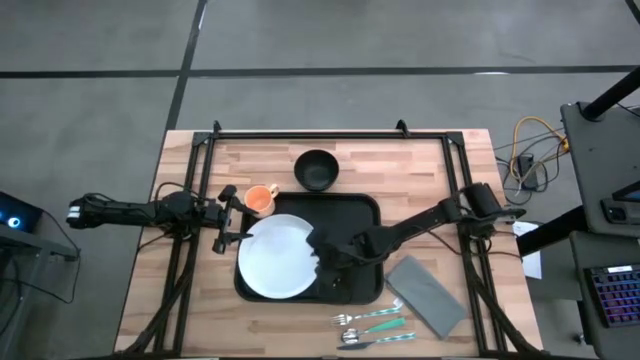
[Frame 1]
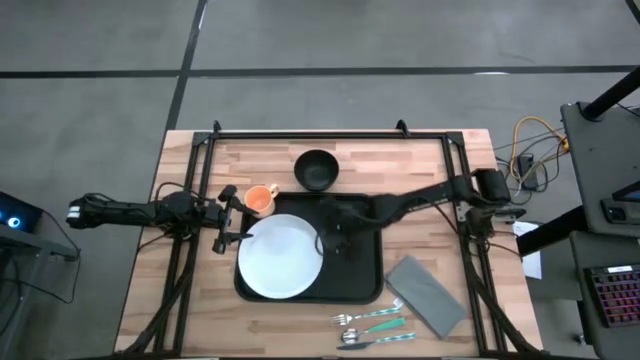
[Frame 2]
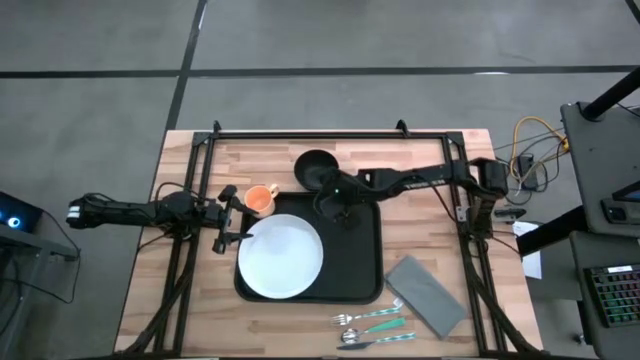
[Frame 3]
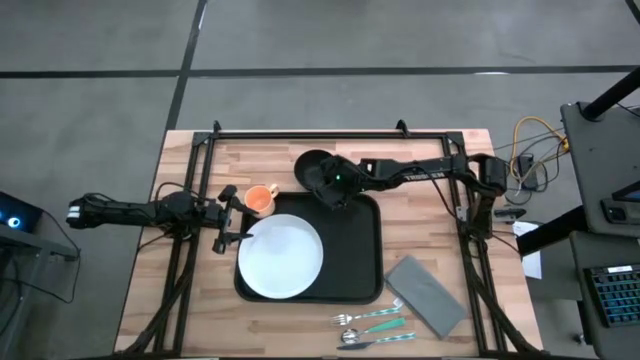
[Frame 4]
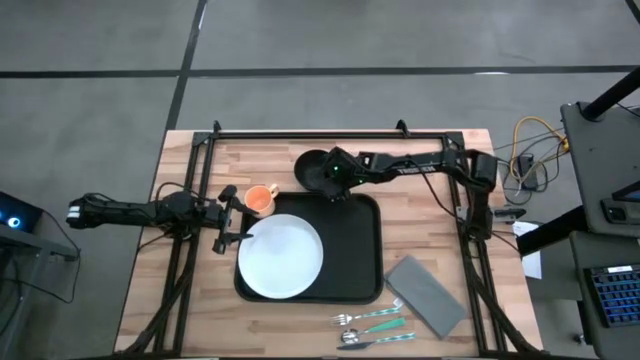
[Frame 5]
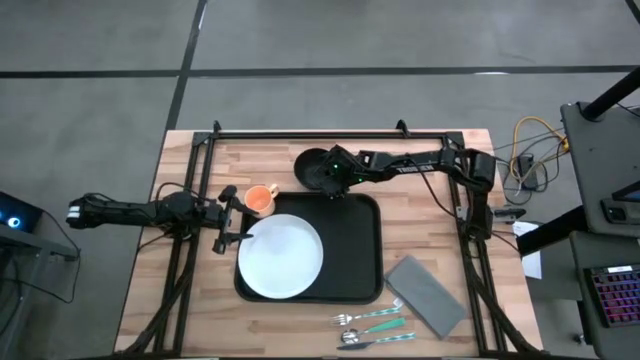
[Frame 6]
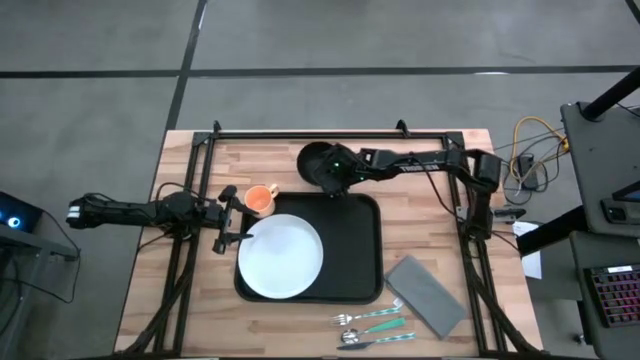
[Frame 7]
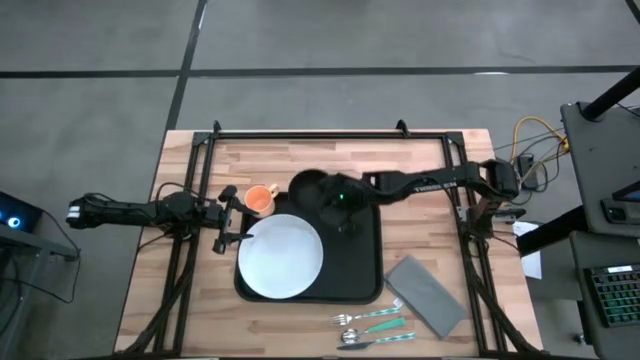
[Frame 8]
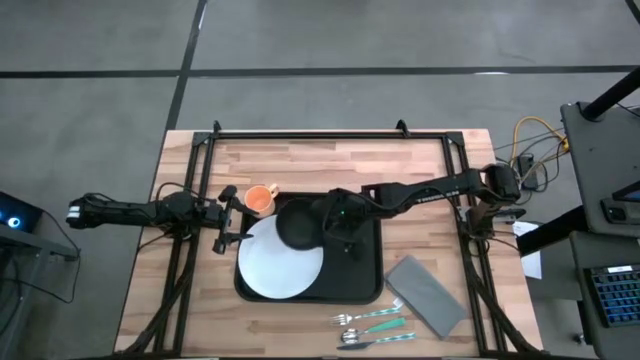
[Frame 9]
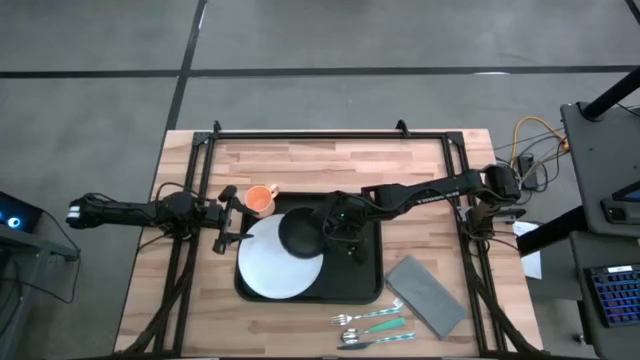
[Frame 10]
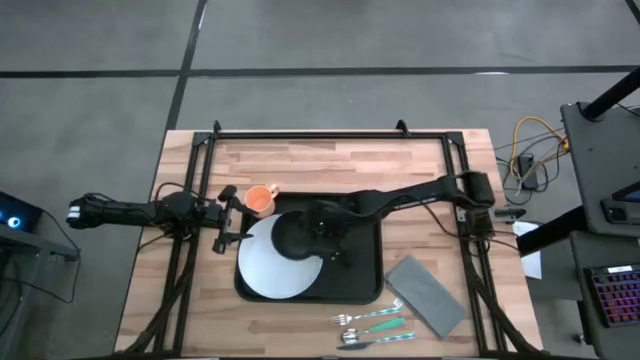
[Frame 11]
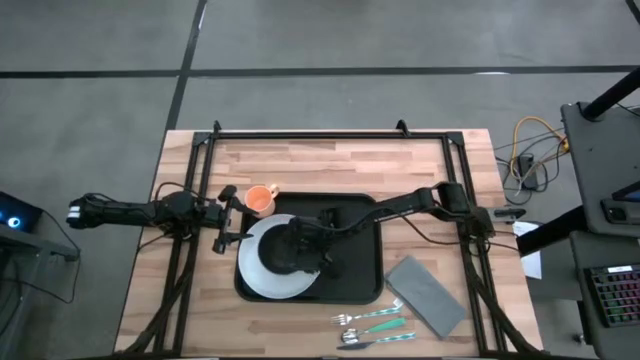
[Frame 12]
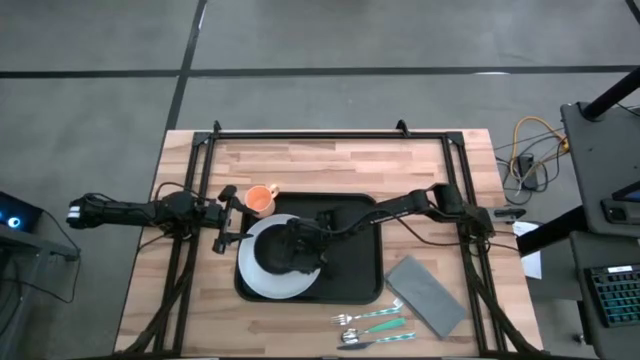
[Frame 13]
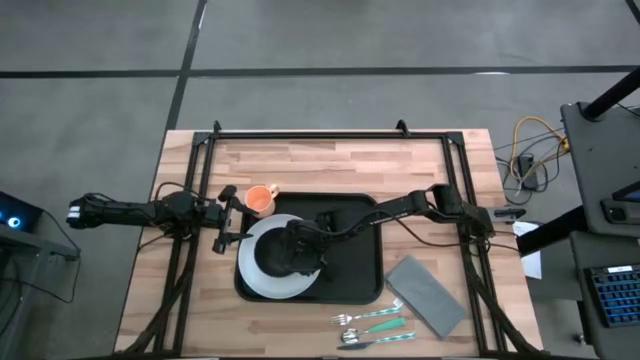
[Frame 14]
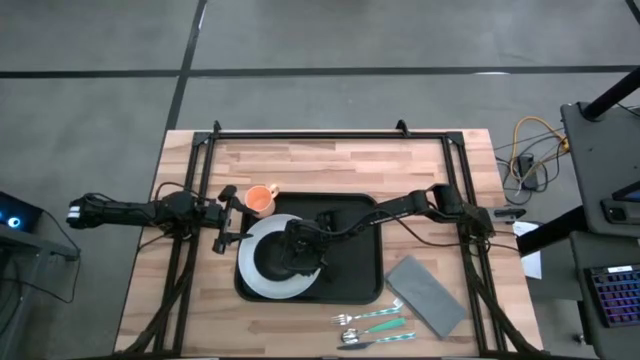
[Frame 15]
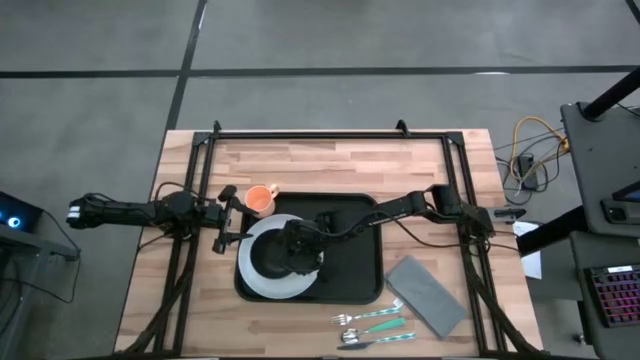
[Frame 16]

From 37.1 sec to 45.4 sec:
Task: Set up tray
Put the black bowl on top of the white plate on the black tray

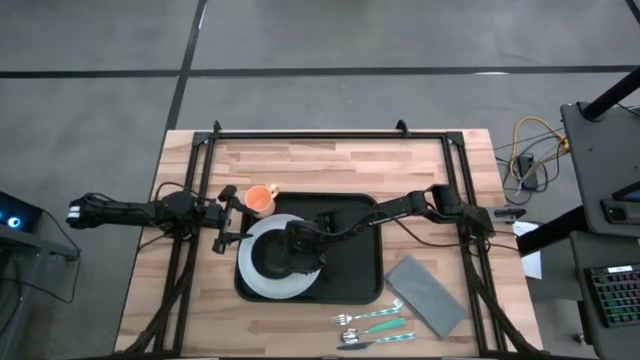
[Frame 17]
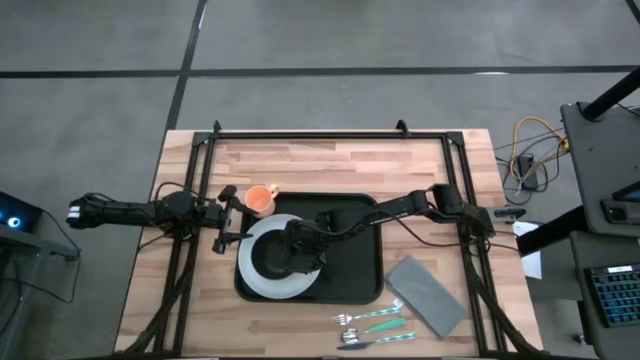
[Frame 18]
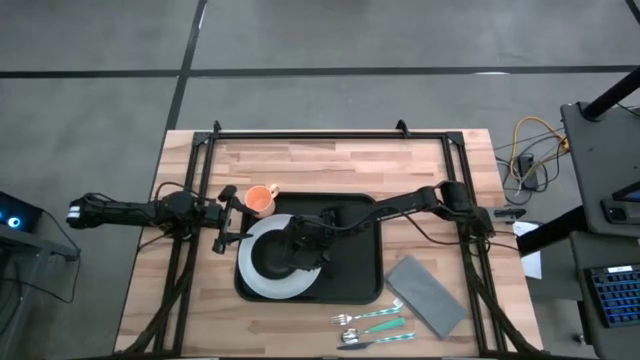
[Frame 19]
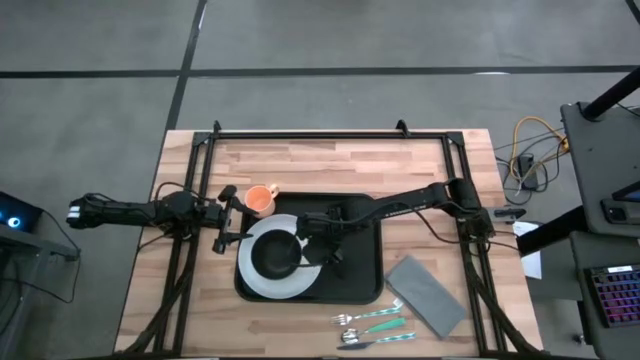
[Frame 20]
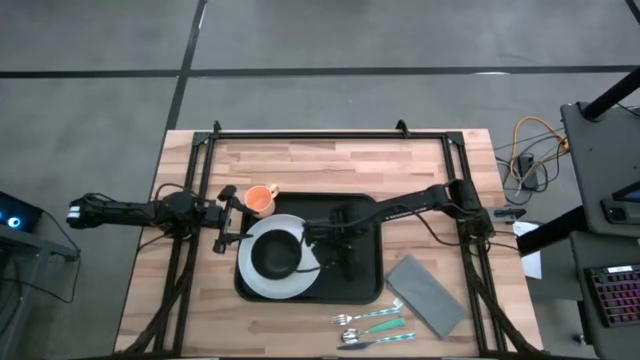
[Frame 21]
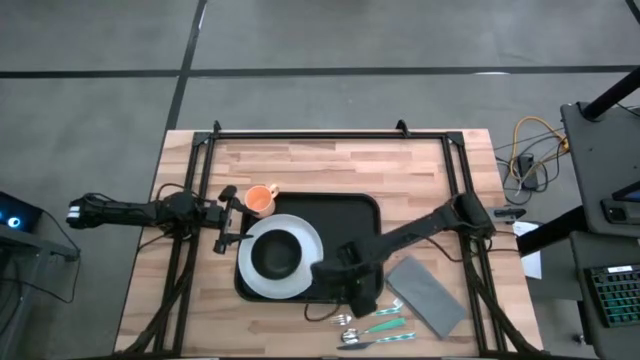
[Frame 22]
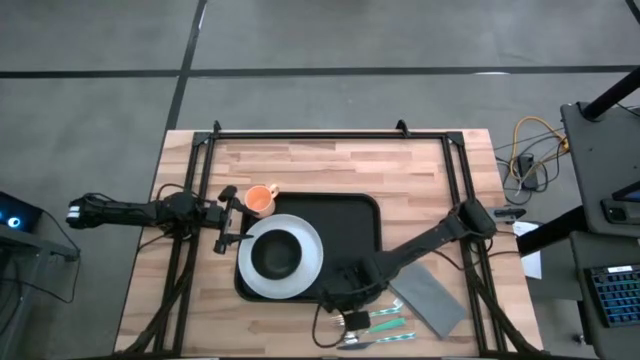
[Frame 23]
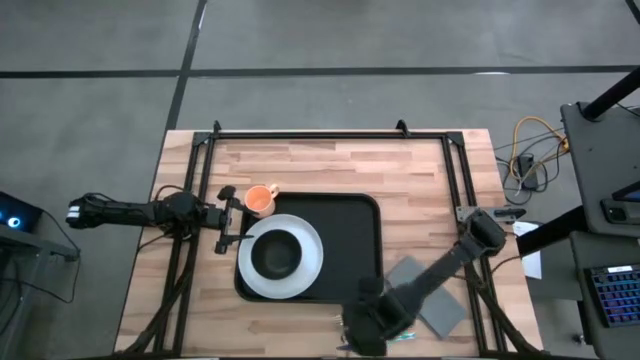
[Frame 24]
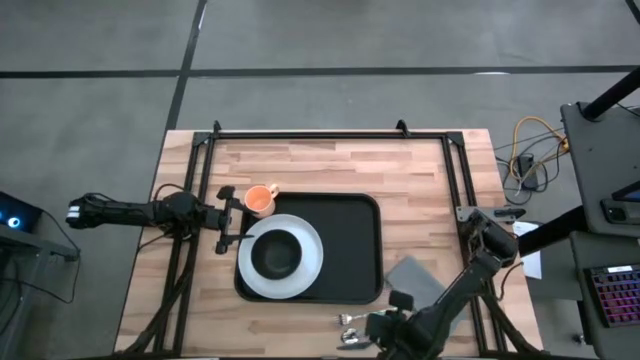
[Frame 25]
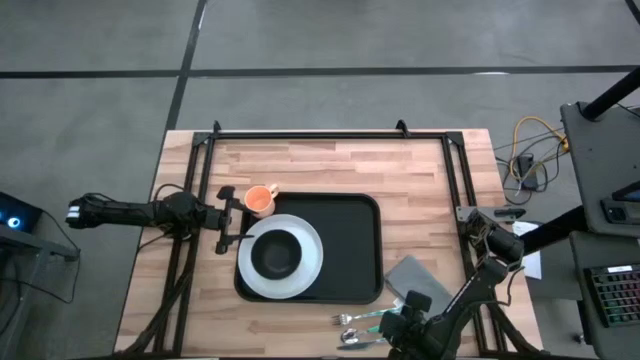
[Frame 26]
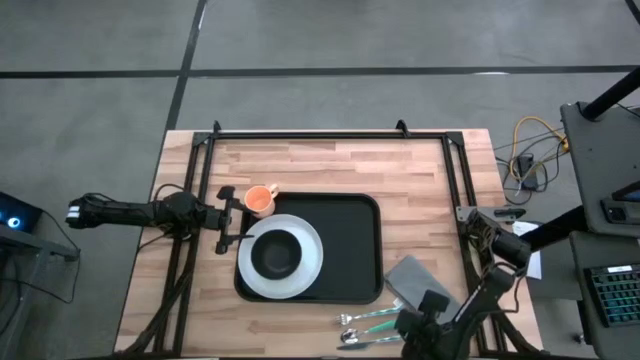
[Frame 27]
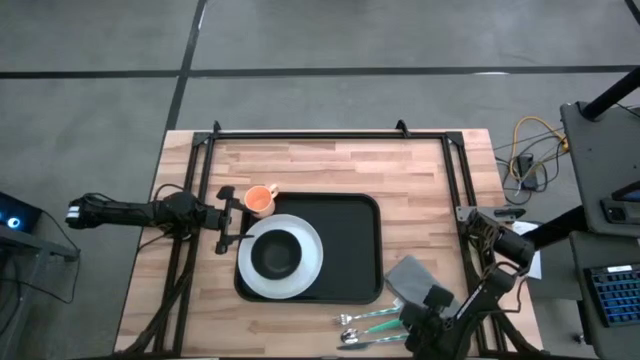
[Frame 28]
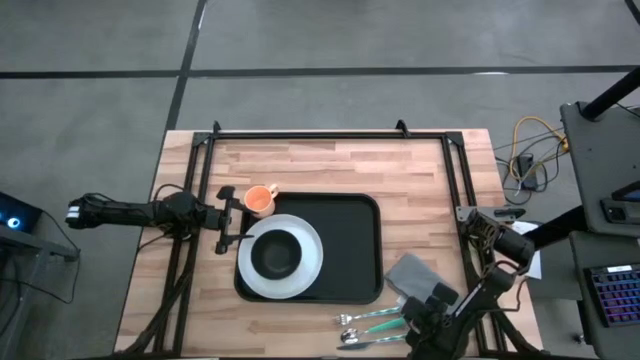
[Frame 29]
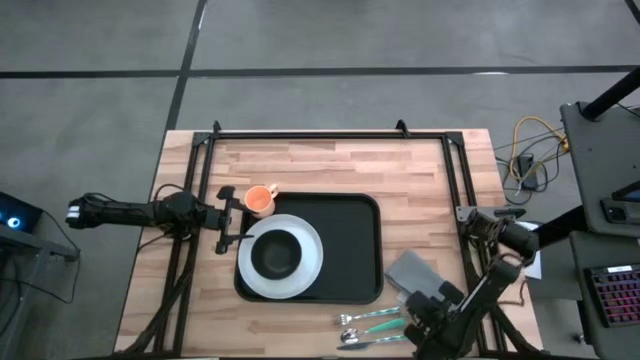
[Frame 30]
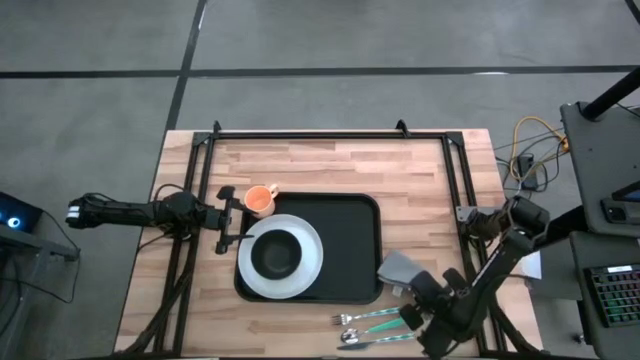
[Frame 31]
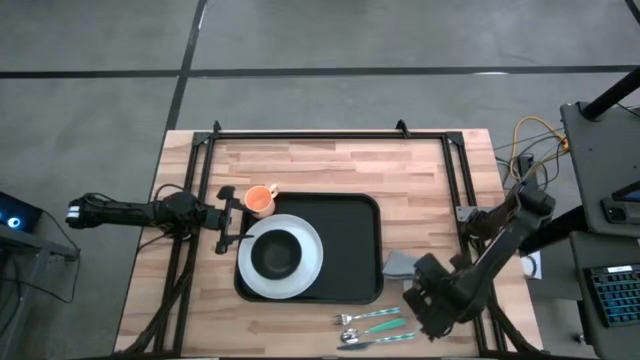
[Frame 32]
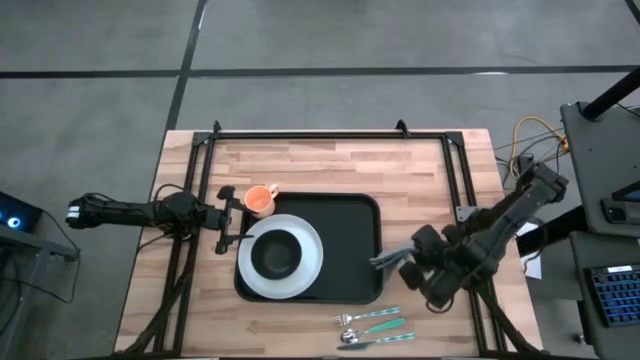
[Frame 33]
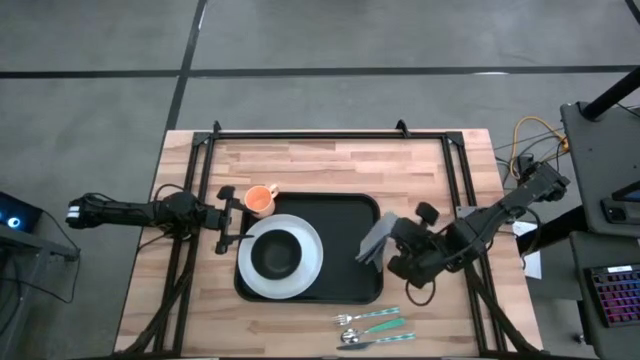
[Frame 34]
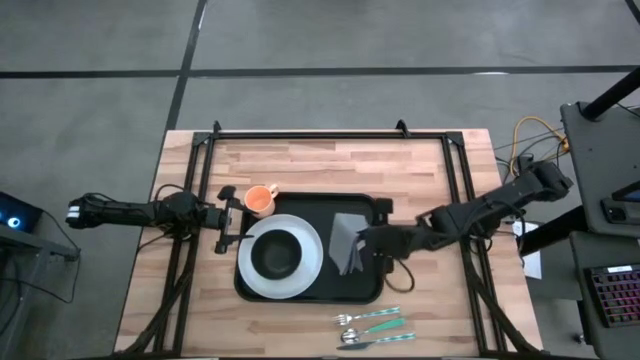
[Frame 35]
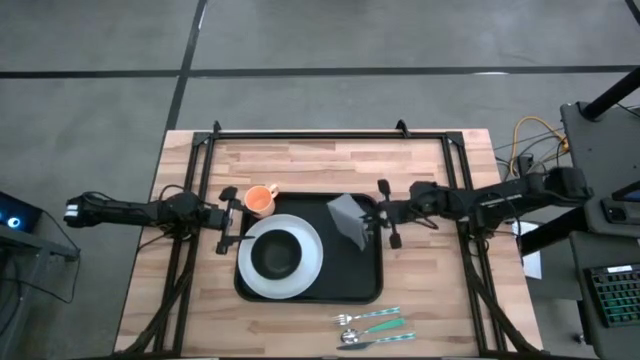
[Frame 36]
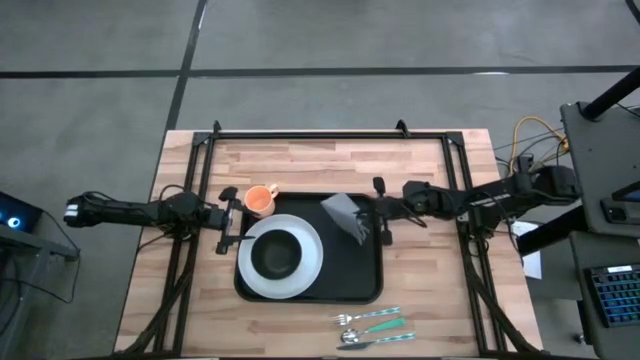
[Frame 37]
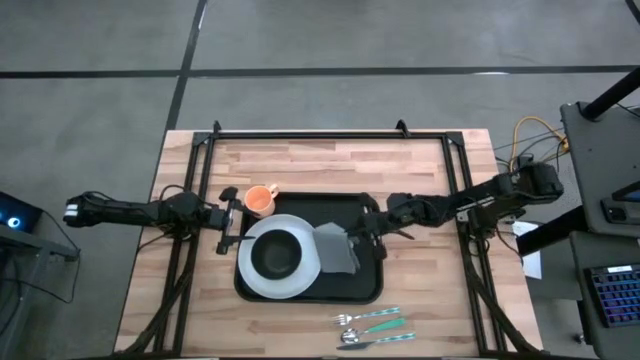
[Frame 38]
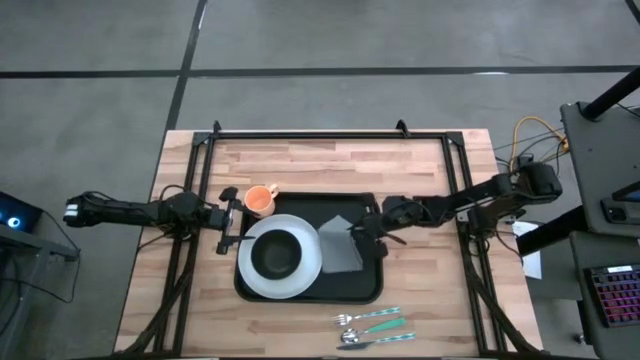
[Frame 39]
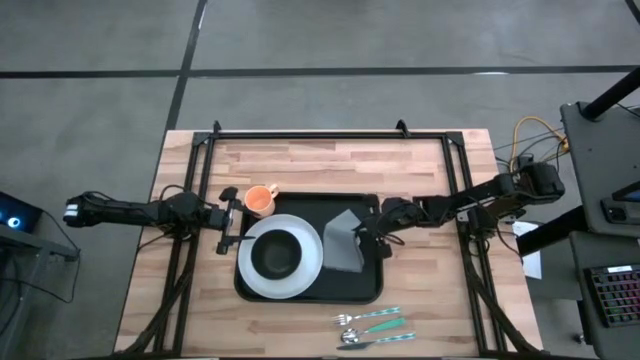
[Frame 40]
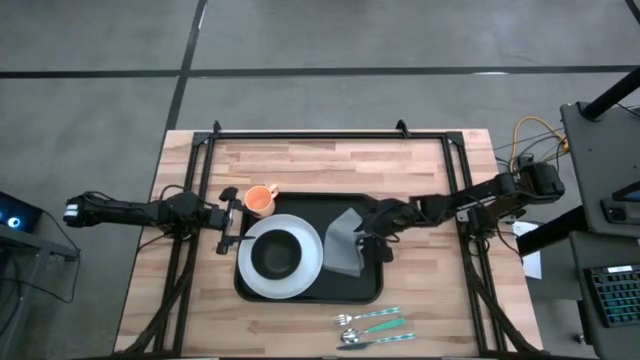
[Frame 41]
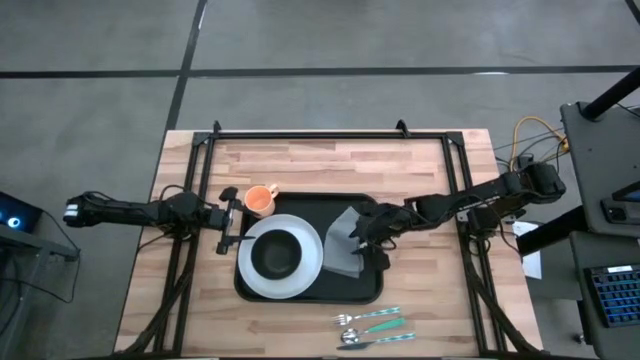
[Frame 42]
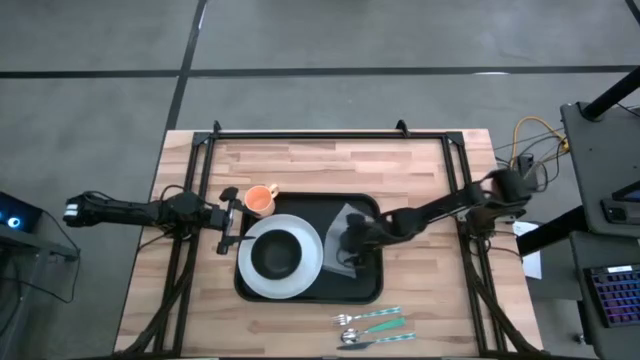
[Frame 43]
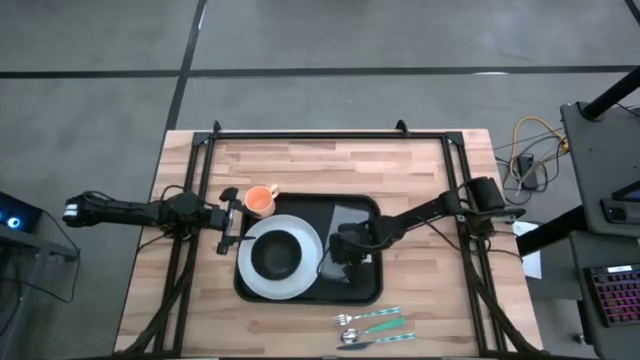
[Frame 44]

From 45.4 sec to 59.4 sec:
Put the gray napkin on the right side of the white plate on the black tray
